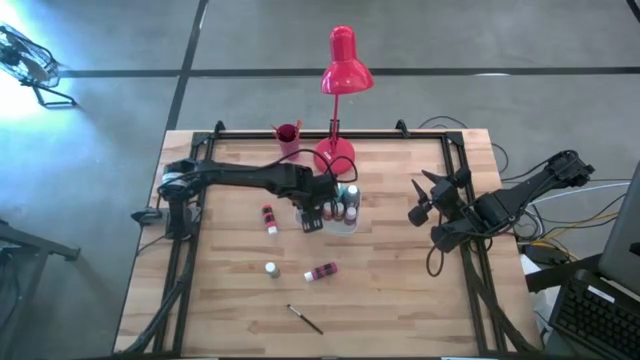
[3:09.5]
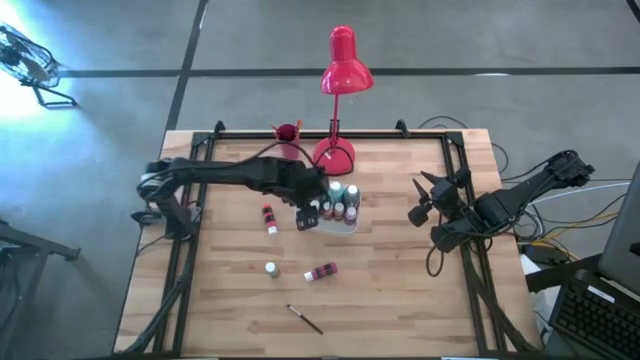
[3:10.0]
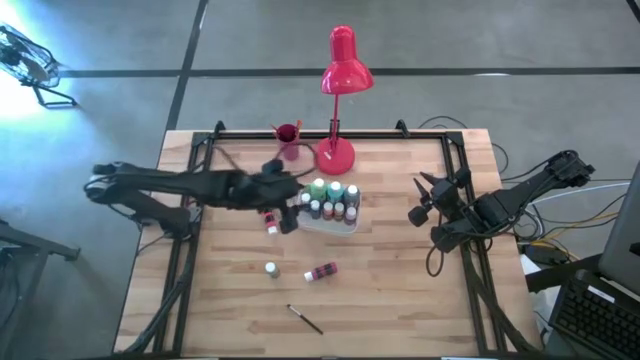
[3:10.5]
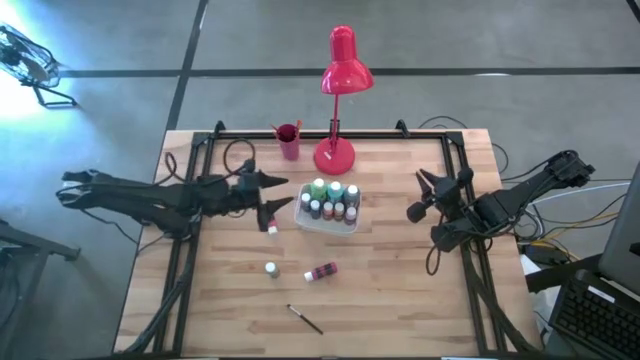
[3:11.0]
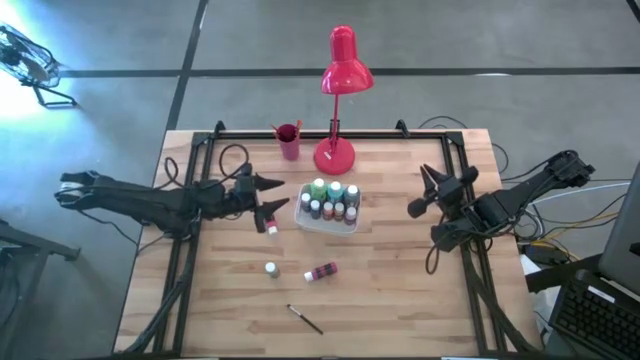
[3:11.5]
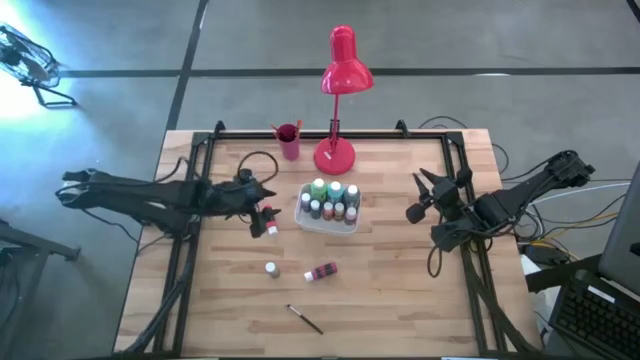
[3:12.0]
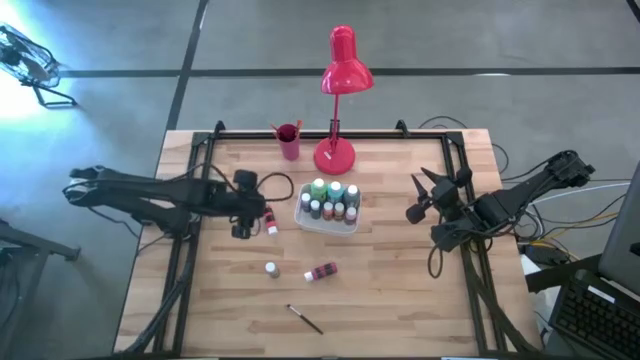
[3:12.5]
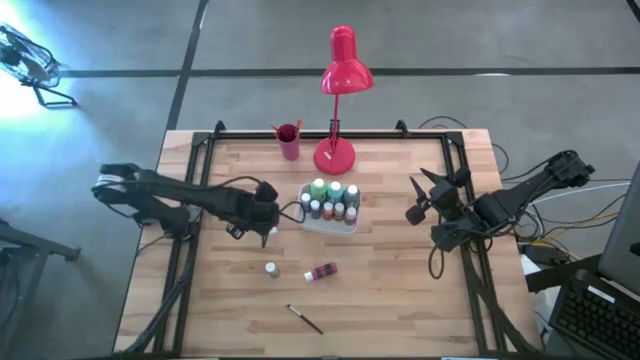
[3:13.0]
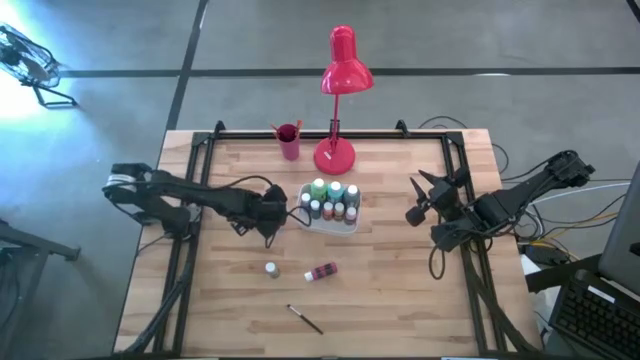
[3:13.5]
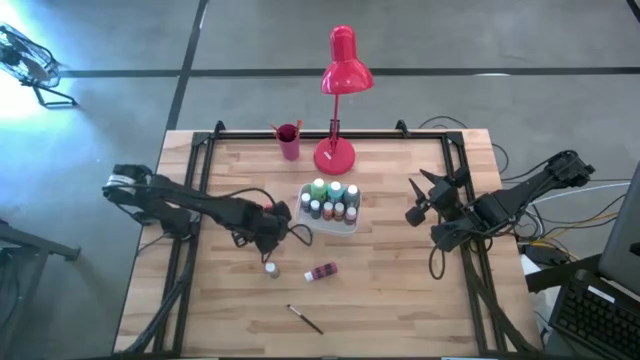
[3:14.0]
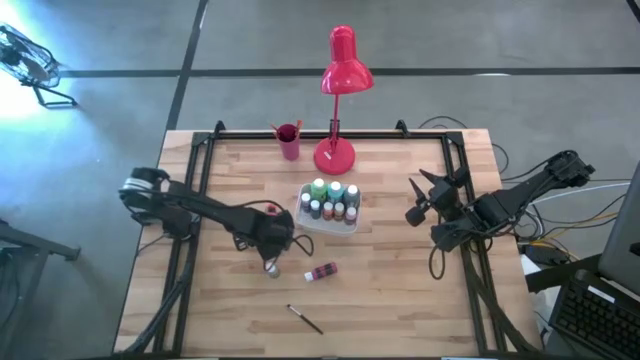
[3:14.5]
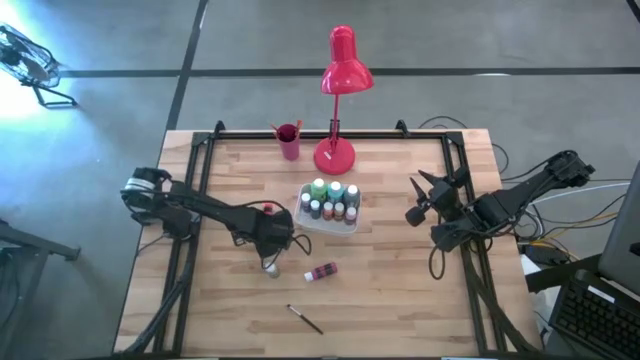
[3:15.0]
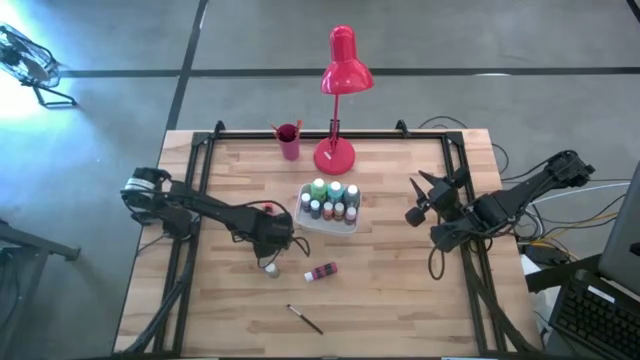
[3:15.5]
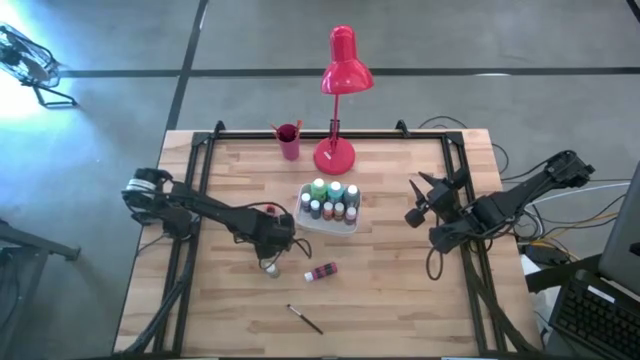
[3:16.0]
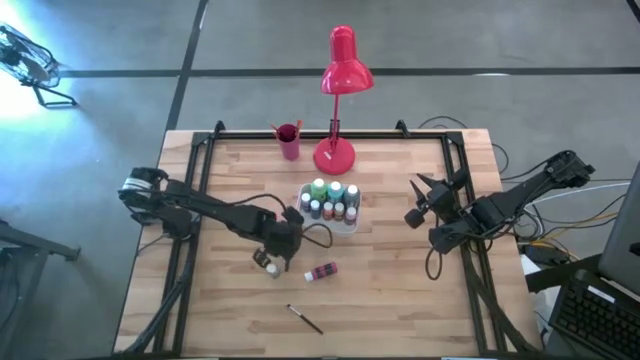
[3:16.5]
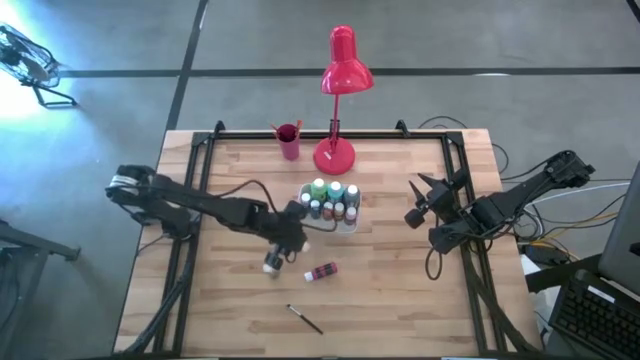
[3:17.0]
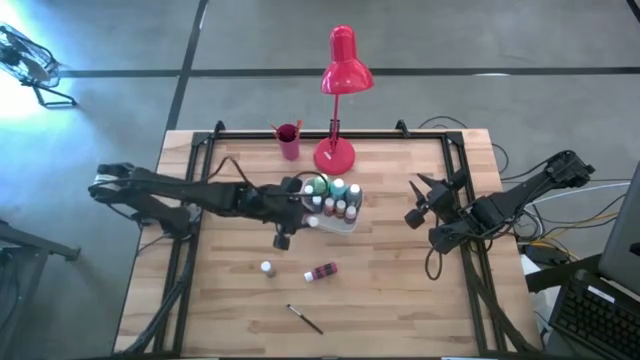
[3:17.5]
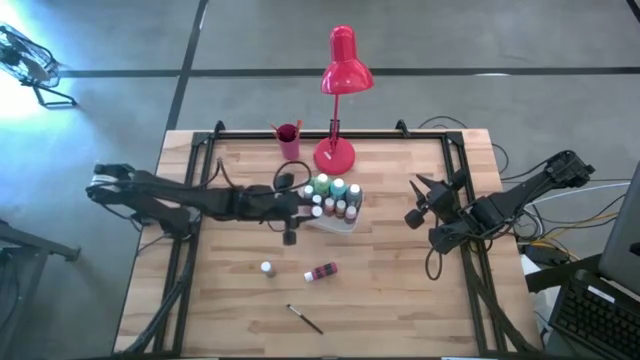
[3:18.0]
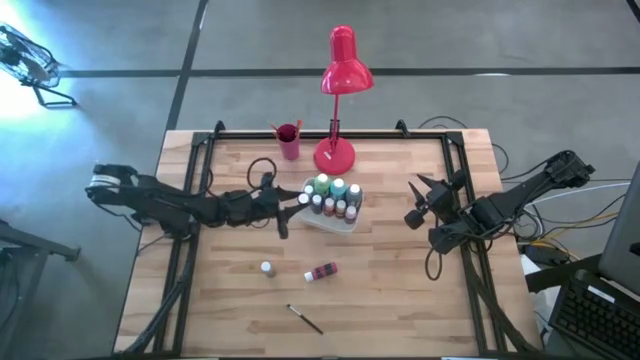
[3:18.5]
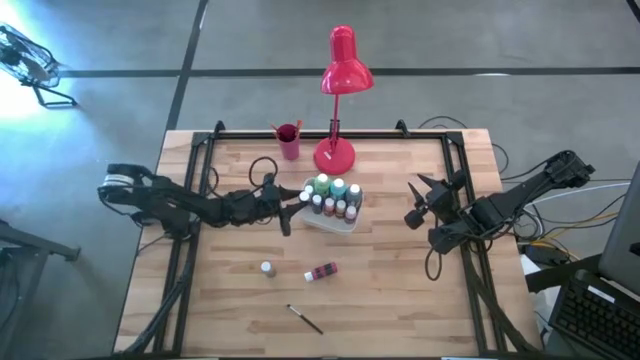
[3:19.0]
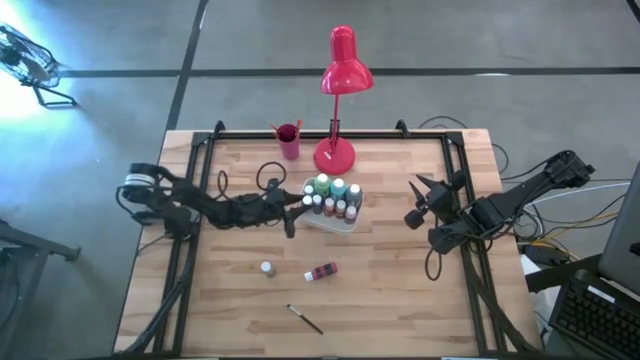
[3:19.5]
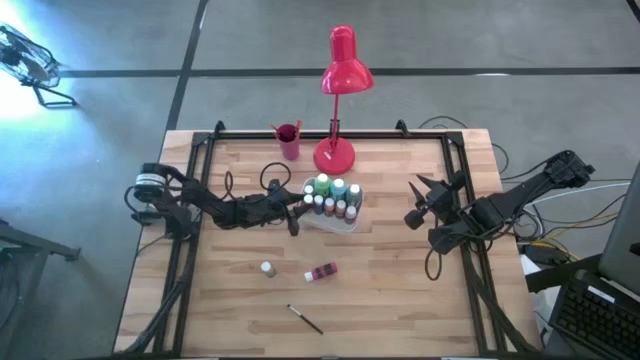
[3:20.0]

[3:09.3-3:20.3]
Task: Pick & Place Paint Supplies
Put the red paint bottle into the white bin

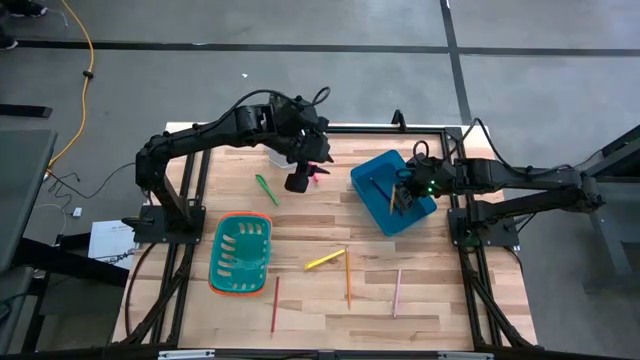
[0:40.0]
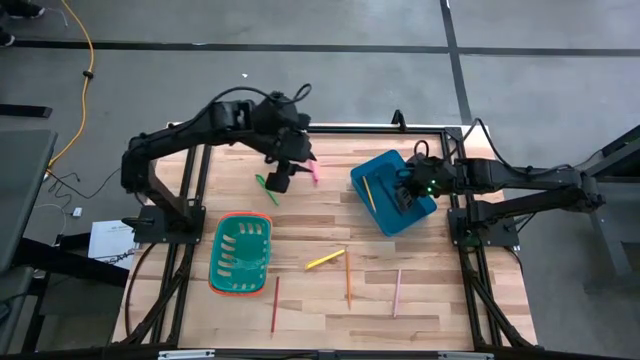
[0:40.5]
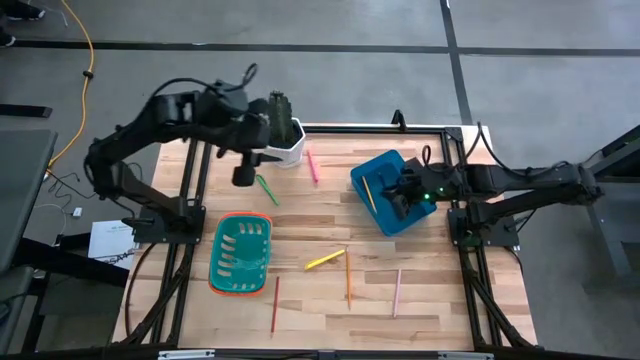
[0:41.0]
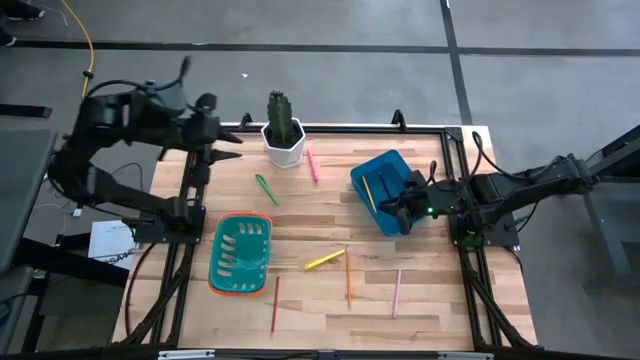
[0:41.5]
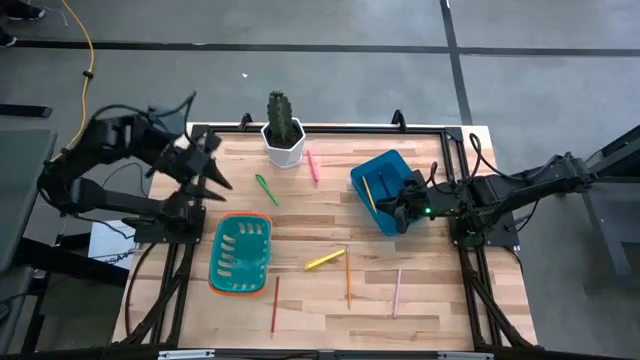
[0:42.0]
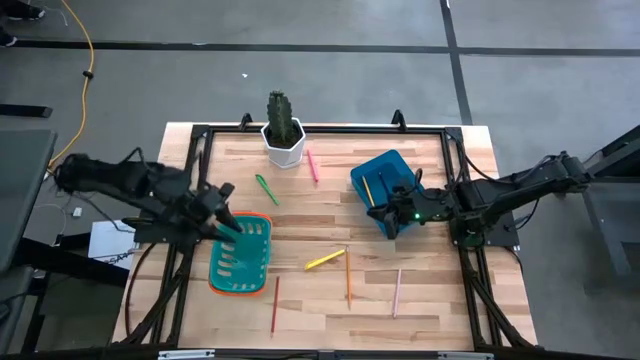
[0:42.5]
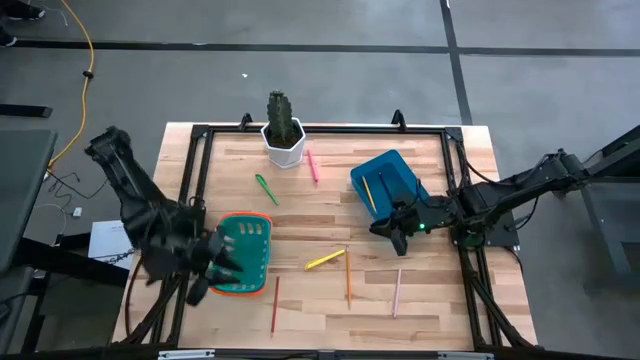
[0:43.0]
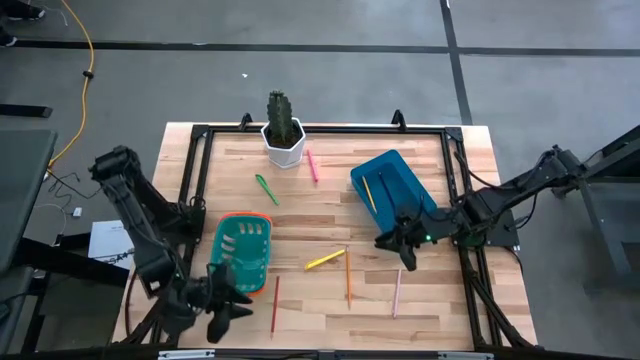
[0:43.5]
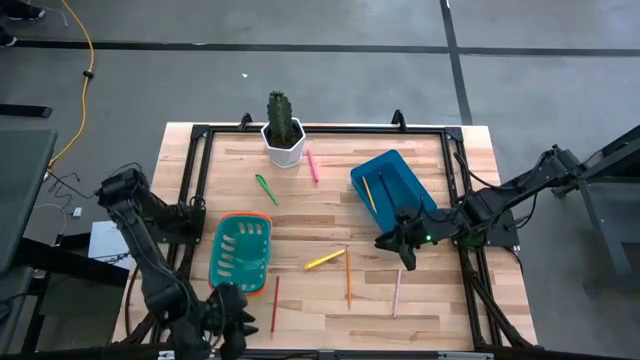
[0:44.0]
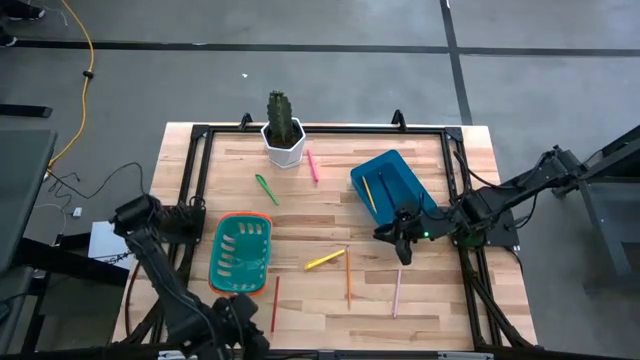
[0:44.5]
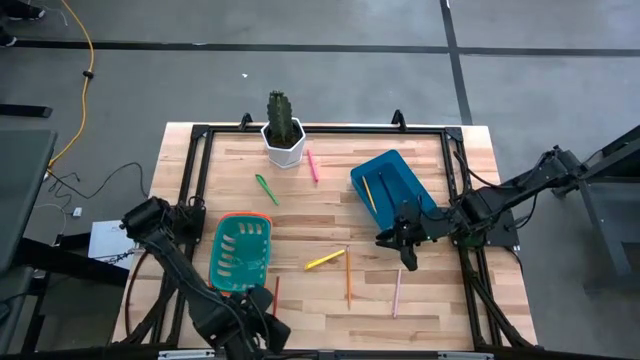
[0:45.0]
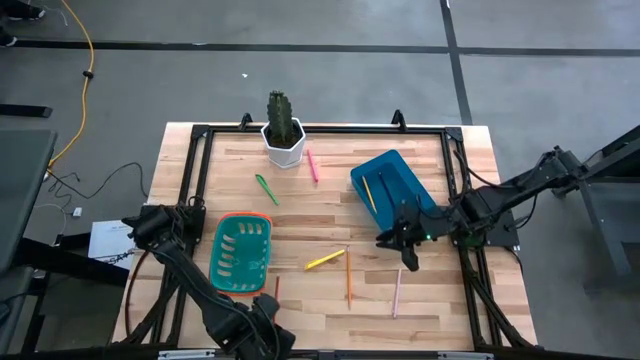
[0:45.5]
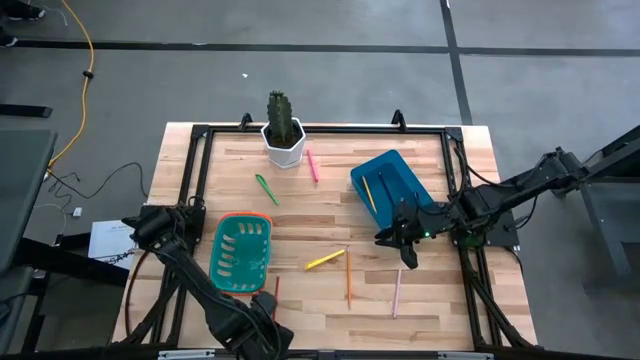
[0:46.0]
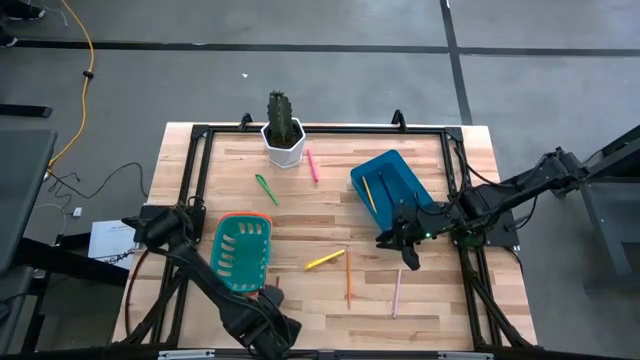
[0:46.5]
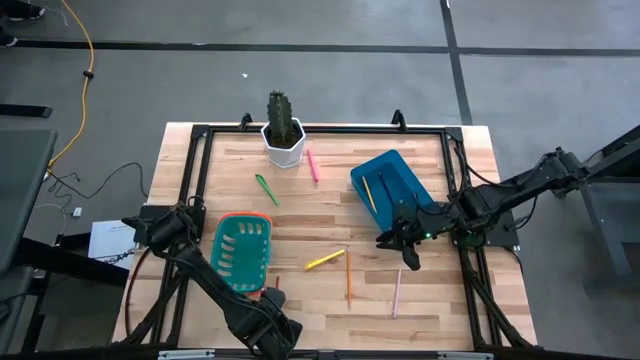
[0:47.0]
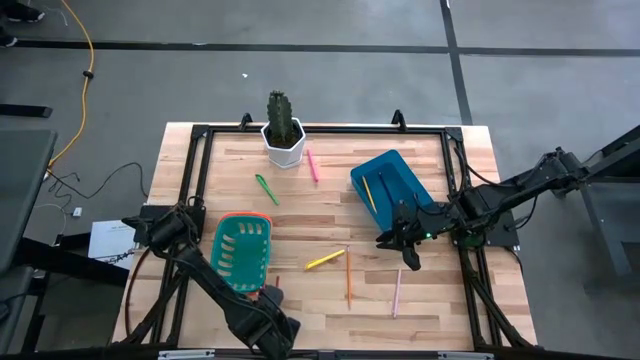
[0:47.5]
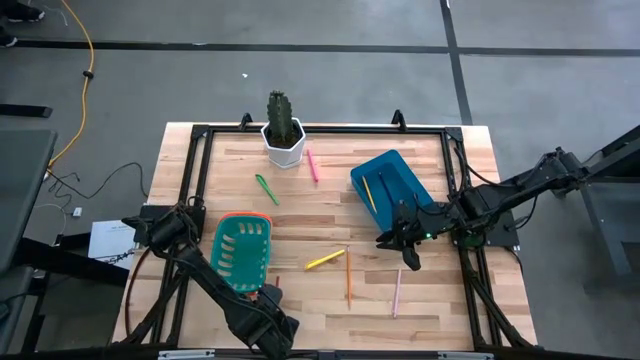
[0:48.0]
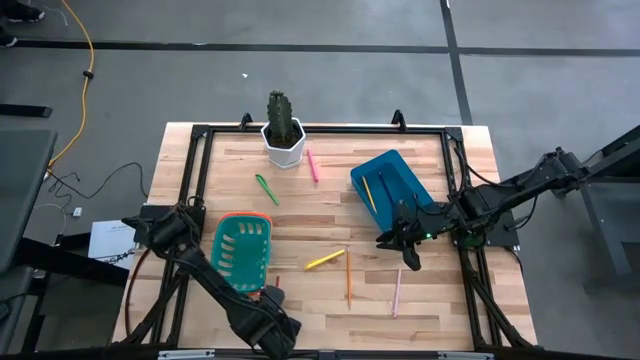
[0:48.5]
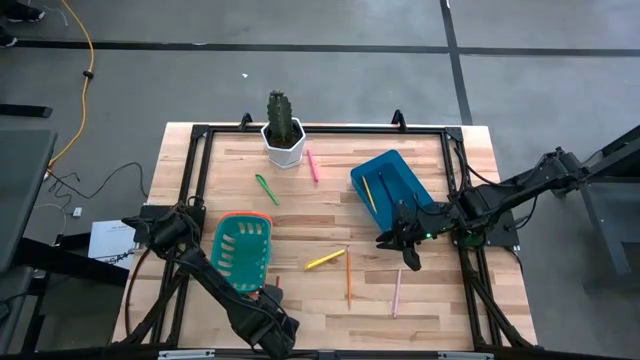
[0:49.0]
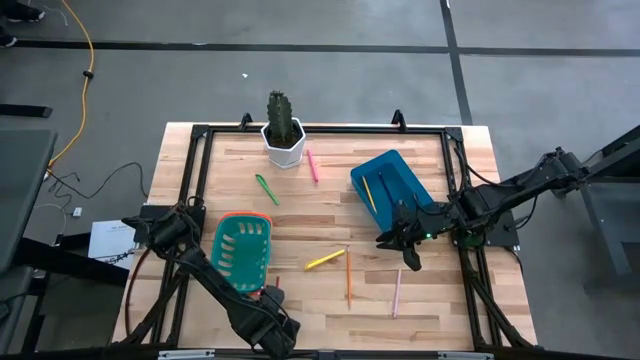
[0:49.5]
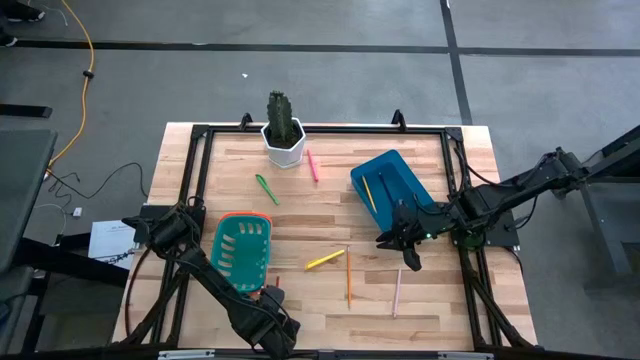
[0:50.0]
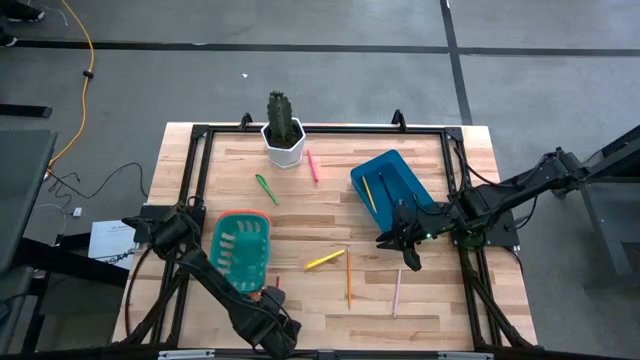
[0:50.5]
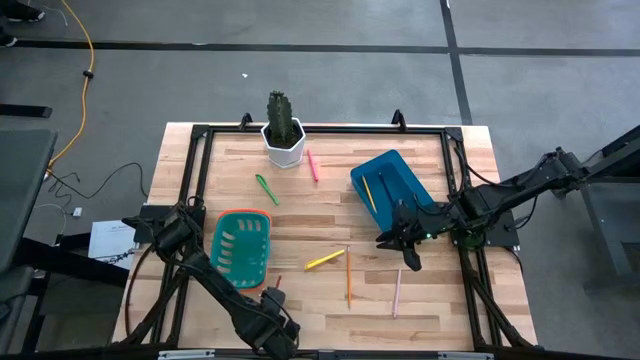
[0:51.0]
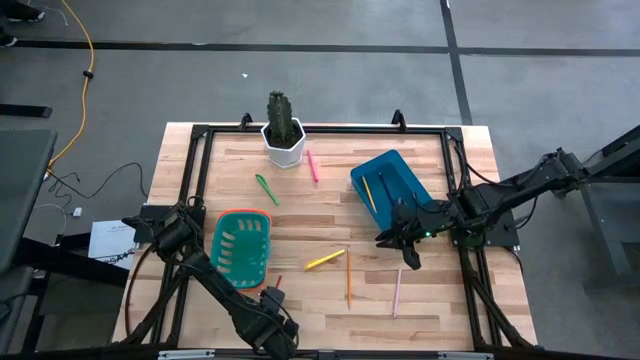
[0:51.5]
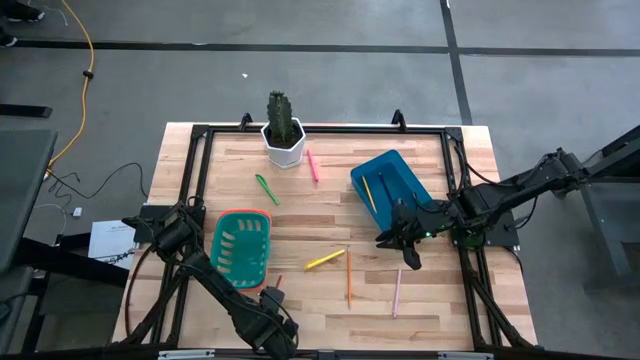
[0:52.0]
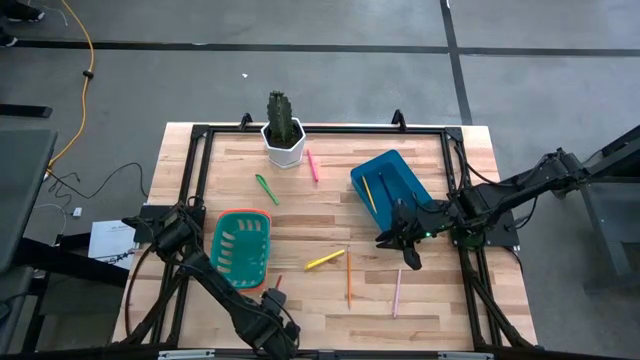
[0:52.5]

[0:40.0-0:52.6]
Task: Sort pens & pencils
Put the red pencil into the blue bin
